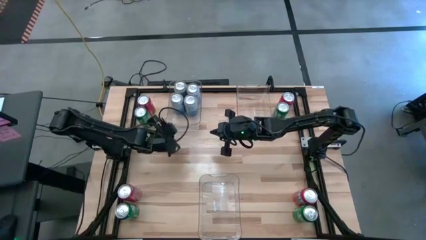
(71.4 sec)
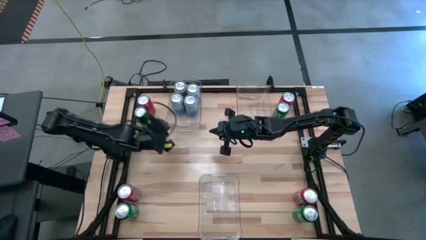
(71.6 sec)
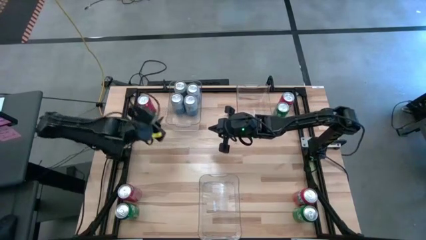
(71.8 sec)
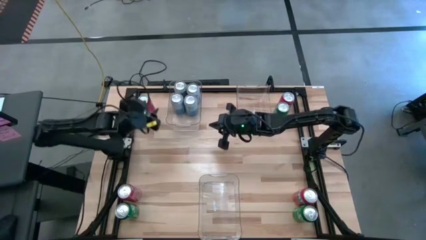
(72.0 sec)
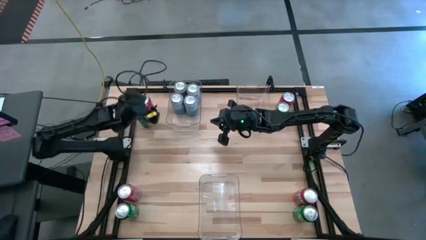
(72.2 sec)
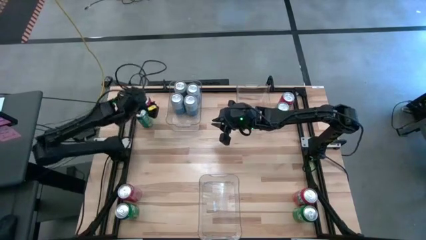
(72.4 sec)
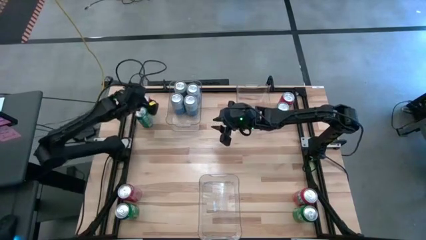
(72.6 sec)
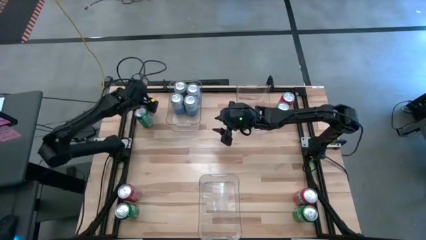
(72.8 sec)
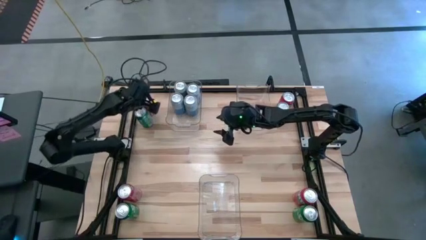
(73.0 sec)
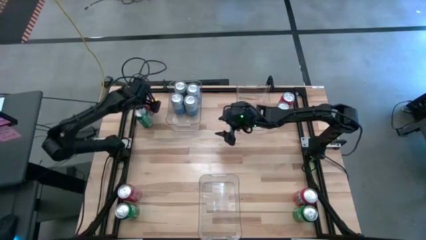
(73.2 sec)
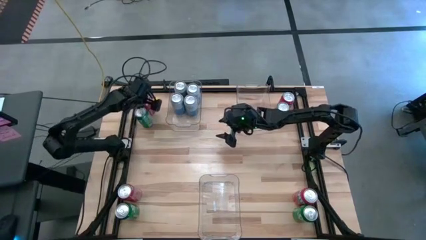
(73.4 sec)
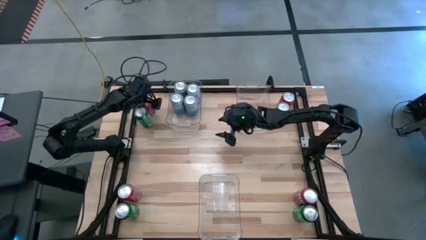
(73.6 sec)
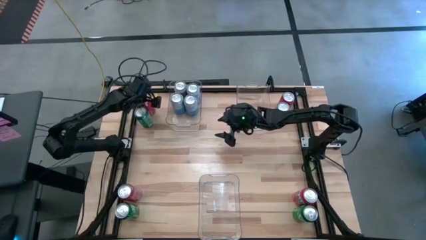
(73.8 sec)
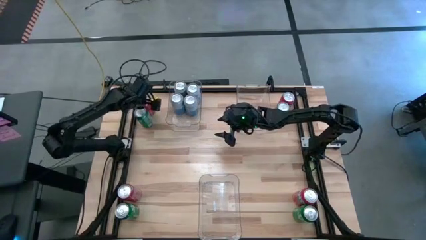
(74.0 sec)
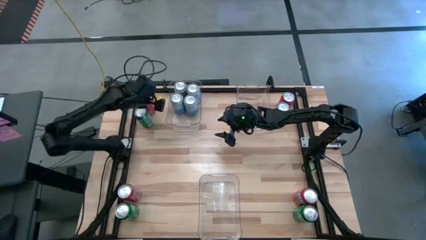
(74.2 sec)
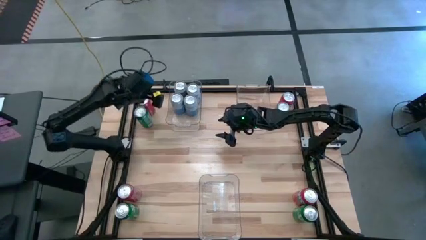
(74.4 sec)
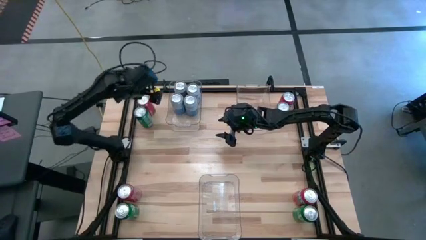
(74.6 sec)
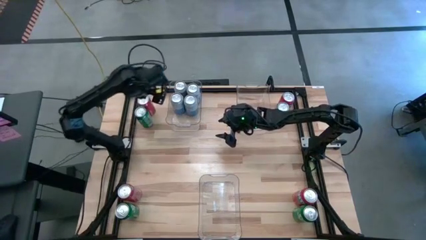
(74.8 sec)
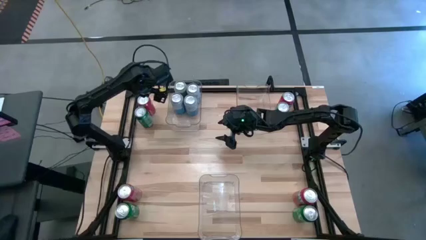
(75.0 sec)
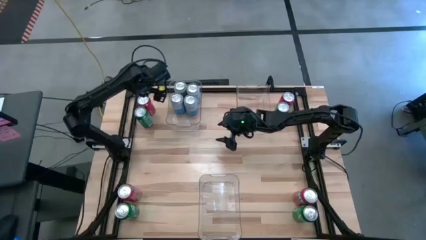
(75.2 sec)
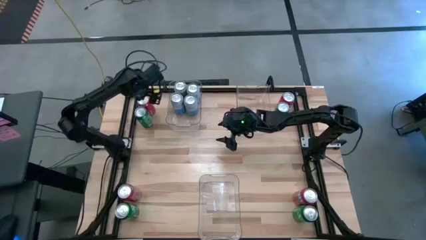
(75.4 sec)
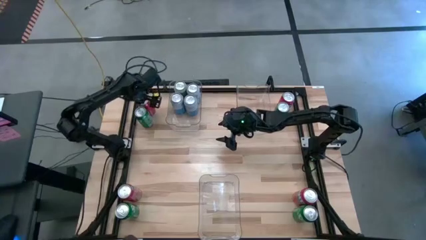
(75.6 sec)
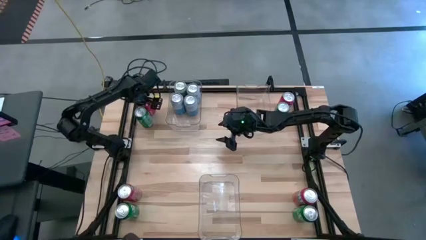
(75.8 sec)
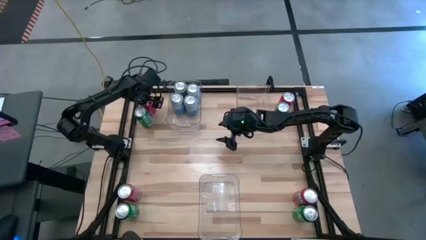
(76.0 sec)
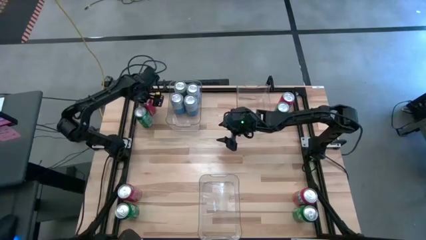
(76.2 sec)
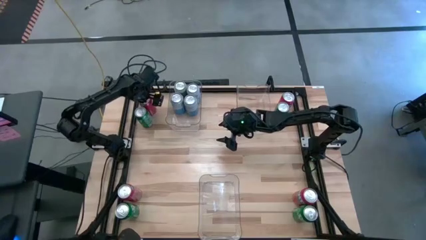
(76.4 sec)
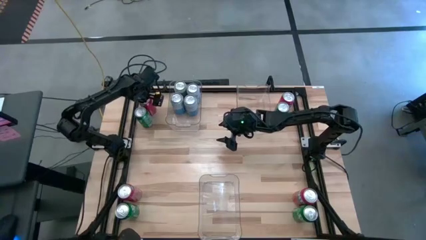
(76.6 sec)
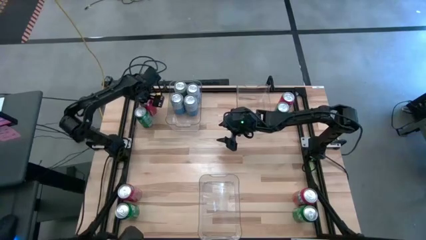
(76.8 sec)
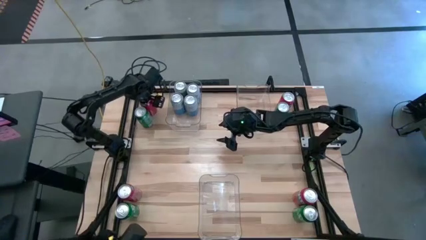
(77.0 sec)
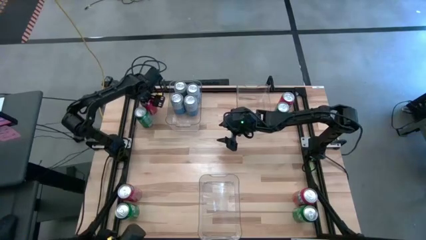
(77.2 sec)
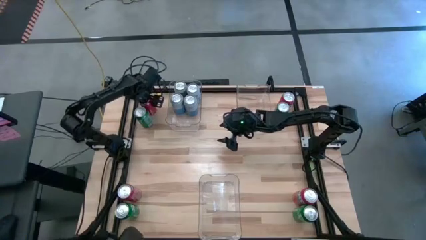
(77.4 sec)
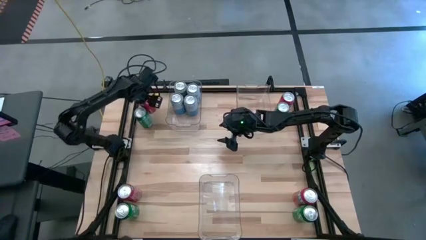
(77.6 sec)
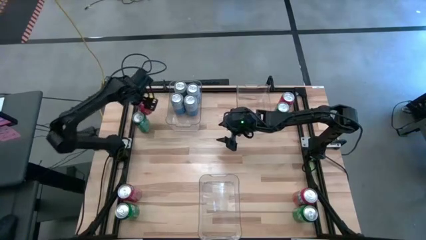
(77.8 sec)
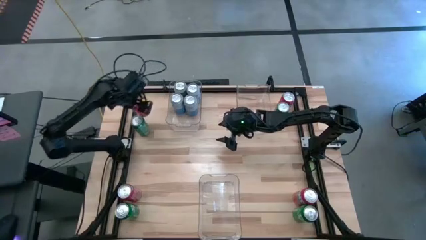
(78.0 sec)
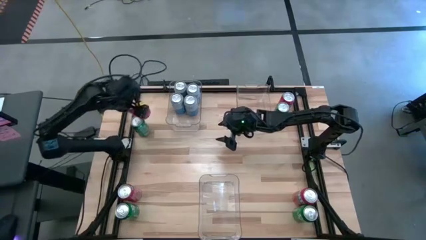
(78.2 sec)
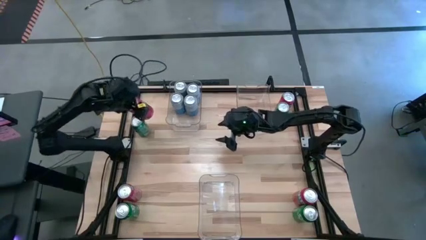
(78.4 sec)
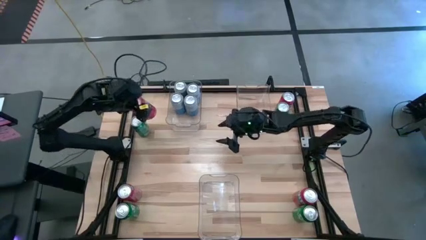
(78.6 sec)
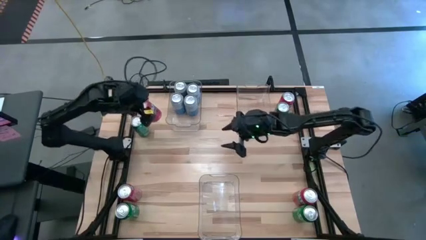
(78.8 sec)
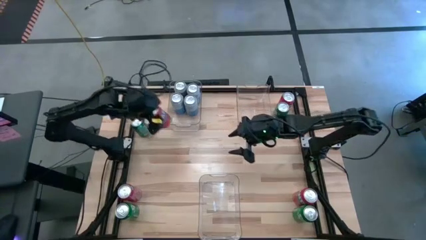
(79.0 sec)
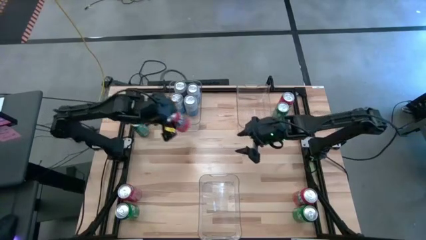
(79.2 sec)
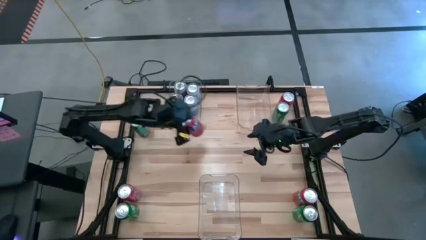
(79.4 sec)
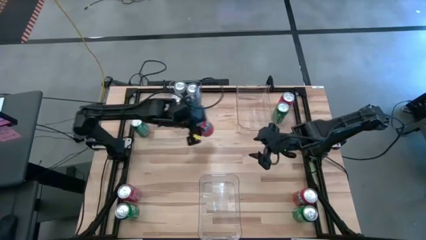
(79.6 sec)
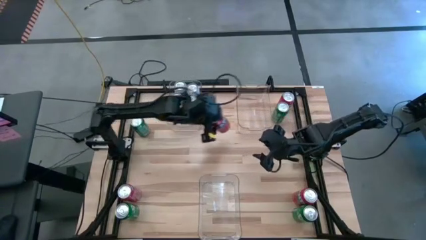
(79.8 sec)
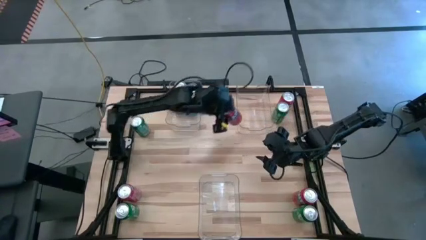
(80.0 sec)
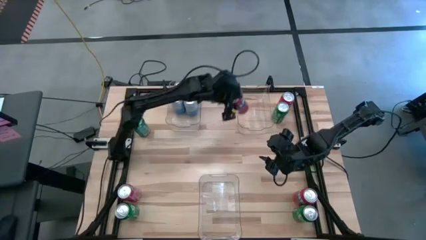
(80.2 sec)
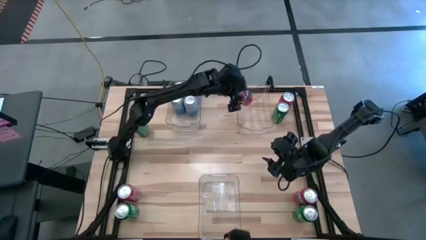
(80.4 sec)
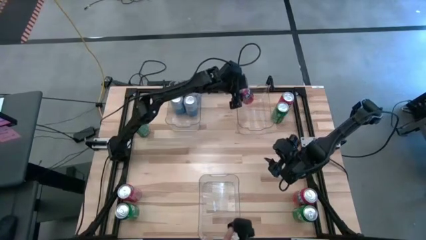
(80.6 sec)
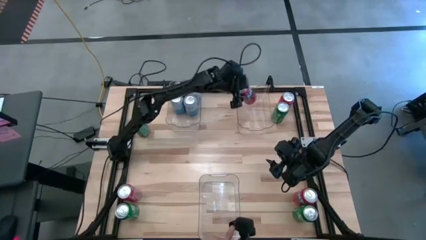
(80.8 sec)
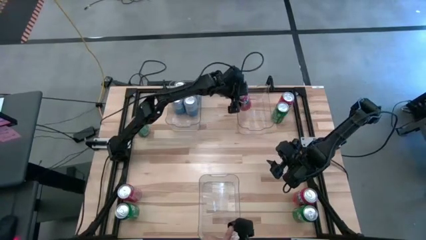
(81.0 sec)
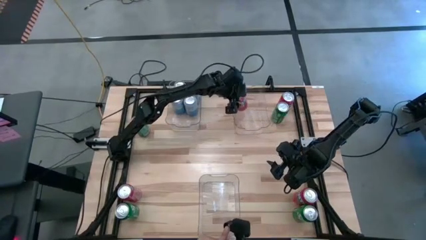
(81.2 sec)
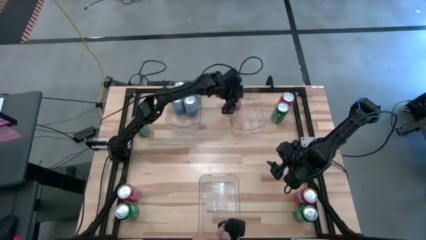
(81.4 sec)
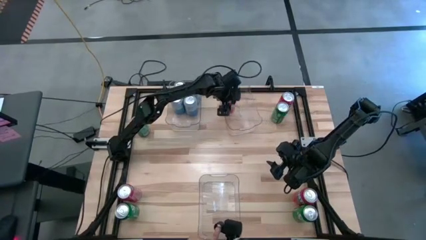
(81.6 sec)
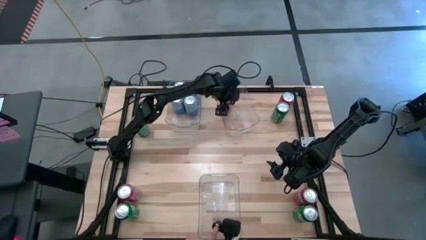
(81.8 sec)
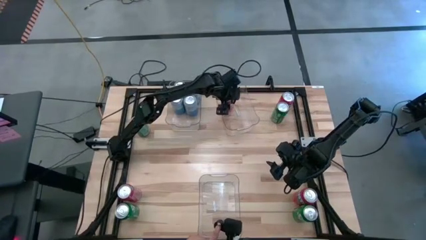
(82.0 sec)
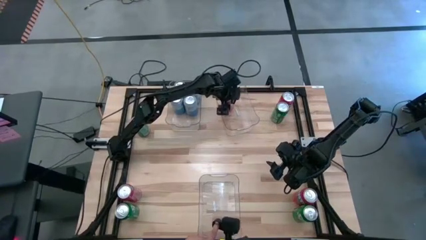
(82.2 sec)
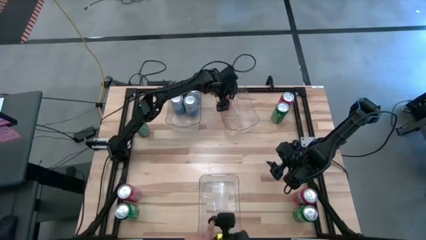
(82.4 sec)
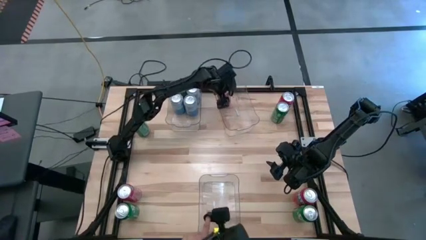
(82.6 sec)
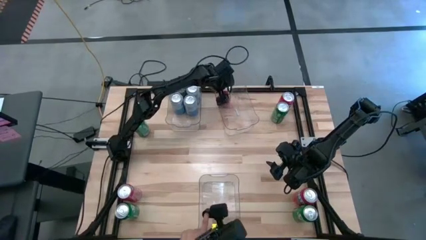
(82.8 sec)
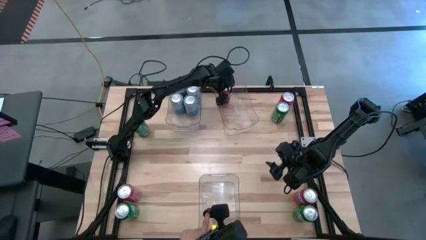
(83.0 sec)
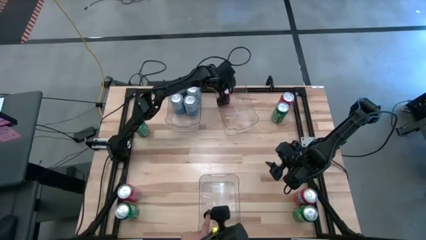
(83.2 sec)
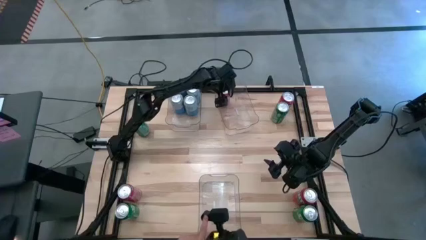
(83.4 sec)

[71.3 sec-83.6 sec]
Task: Sort soda cans
Put the top right red soda can into the top right transparent bin

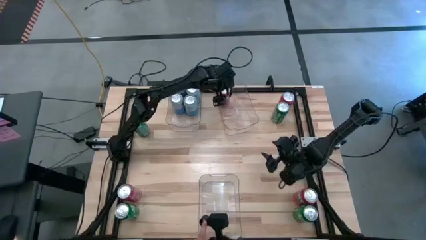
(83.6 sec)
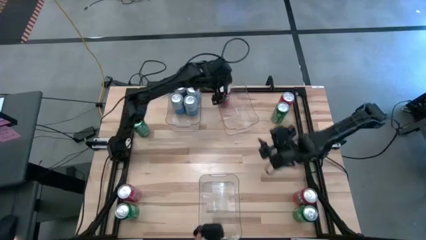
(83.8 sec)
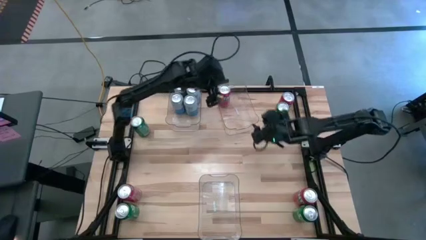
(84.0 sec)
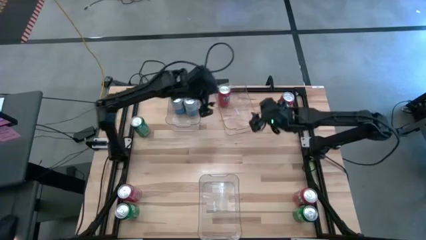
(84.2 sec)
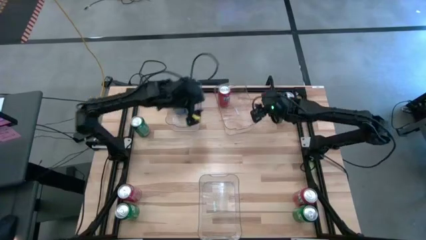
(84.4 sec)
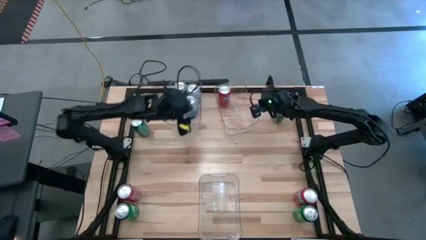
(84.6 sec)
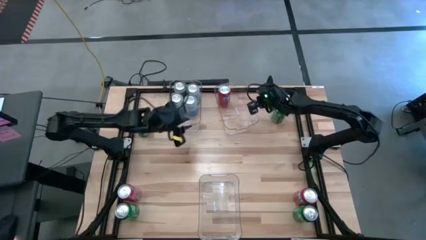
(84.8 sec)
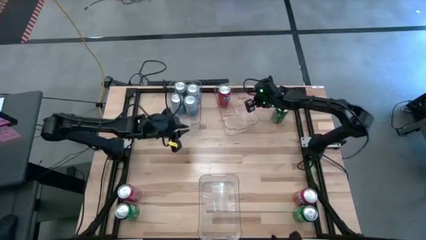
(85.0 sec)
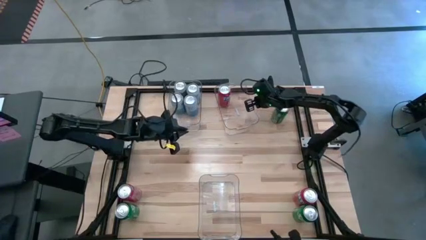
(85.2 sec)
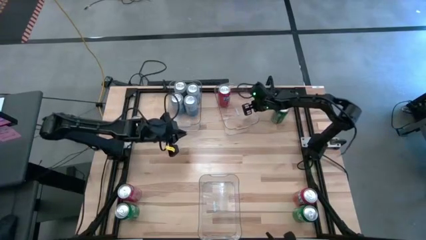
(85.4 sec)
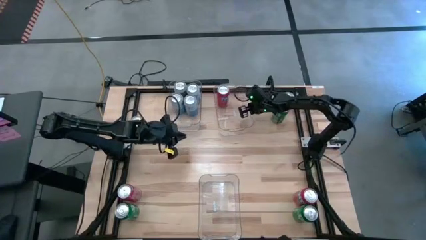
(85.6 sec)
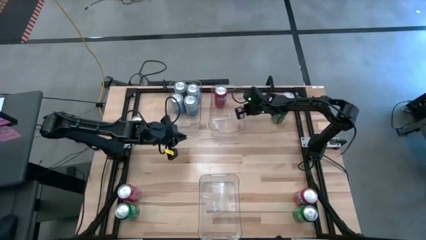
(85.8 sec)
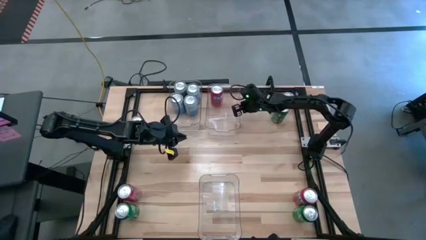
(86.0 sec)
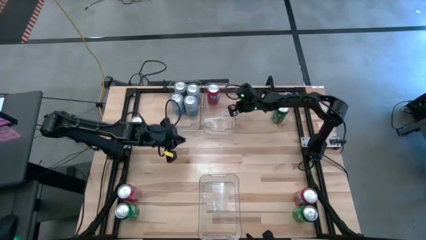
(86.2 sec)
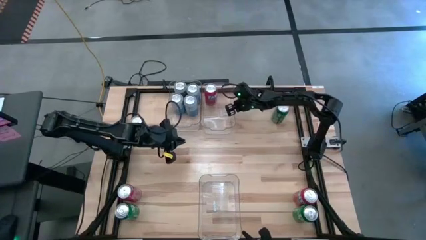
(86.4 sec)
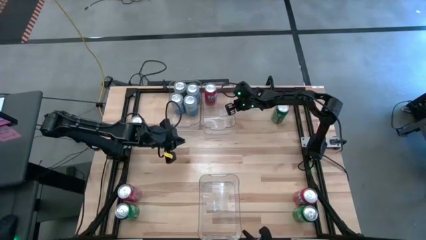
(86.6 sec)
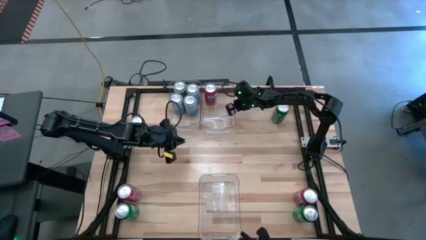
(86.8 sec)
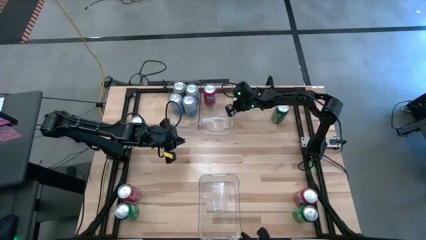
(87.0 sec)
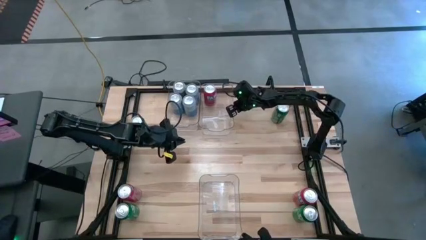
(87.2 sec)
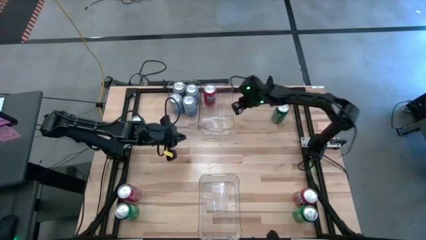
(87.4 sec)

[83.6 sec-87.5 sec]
Adjust the top right transparent bin on the table
